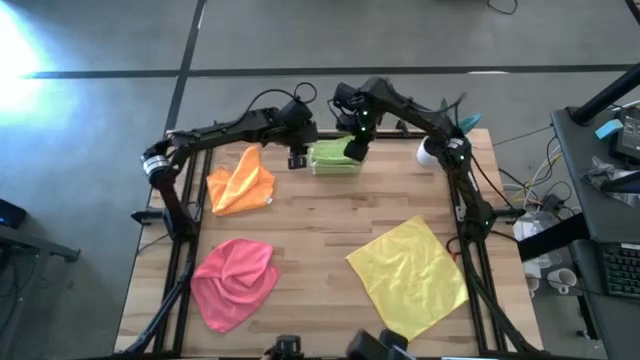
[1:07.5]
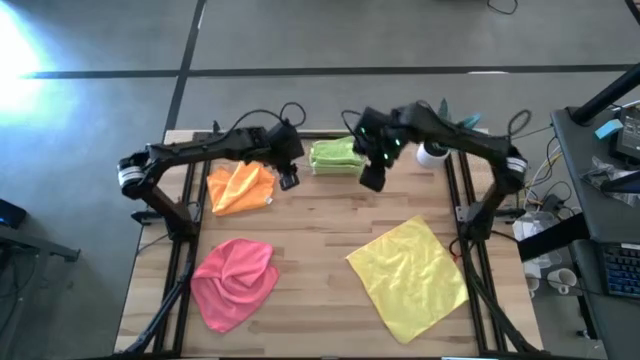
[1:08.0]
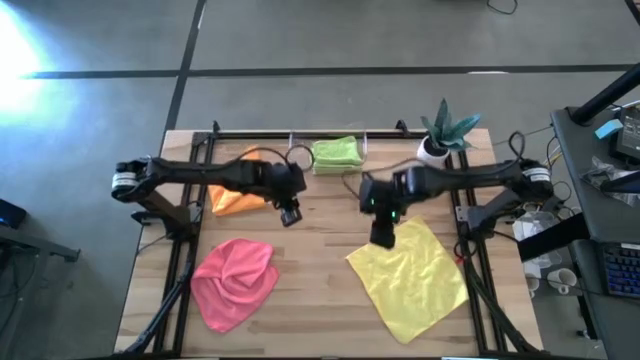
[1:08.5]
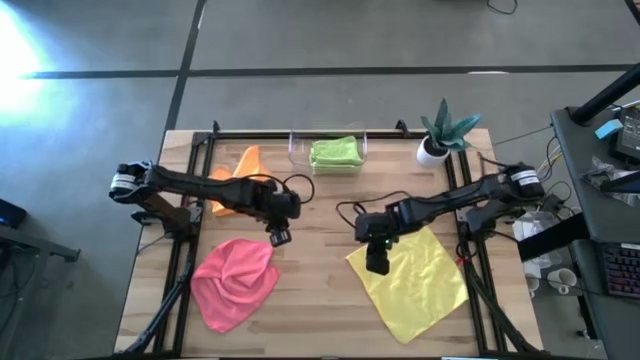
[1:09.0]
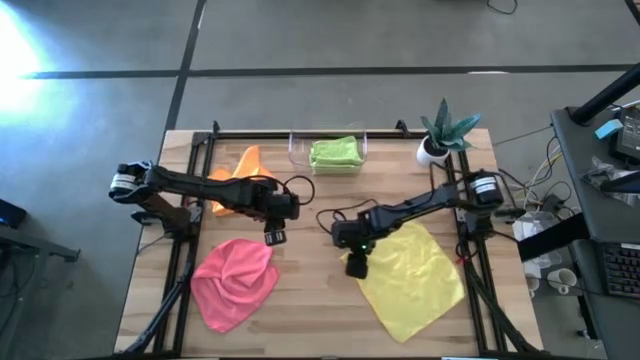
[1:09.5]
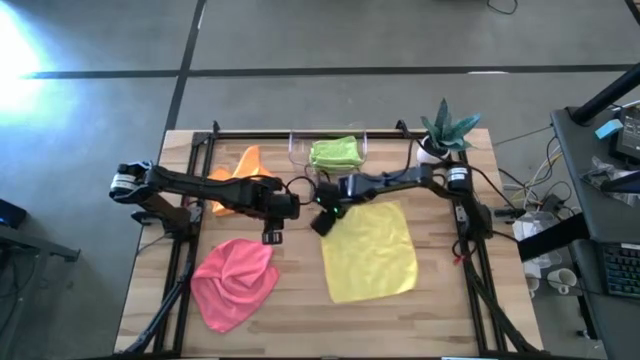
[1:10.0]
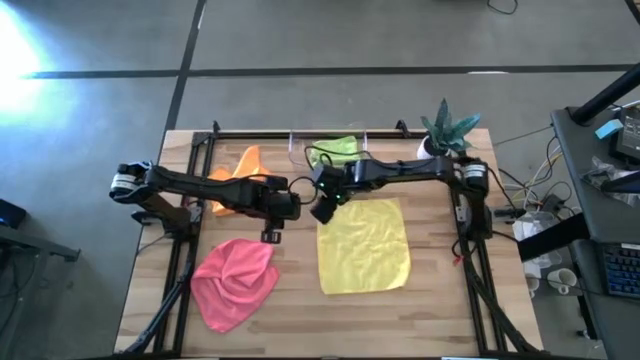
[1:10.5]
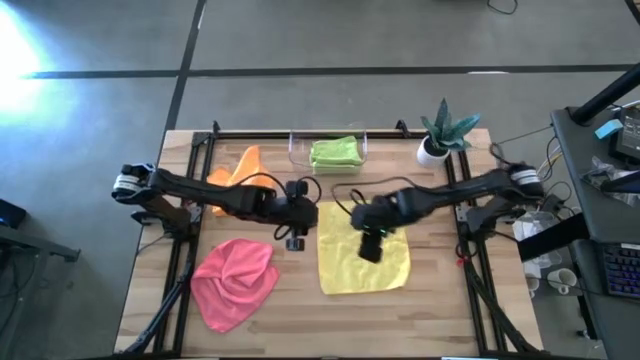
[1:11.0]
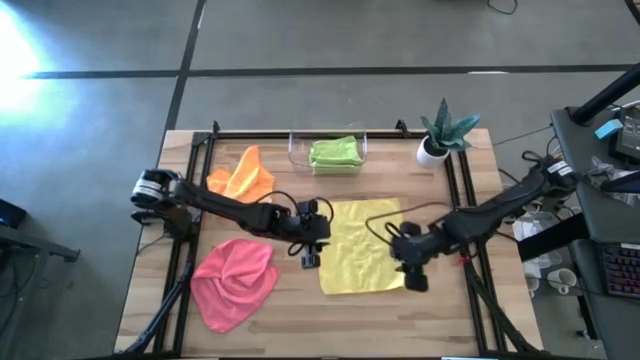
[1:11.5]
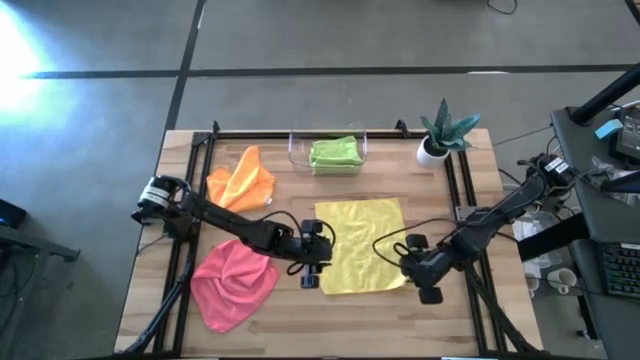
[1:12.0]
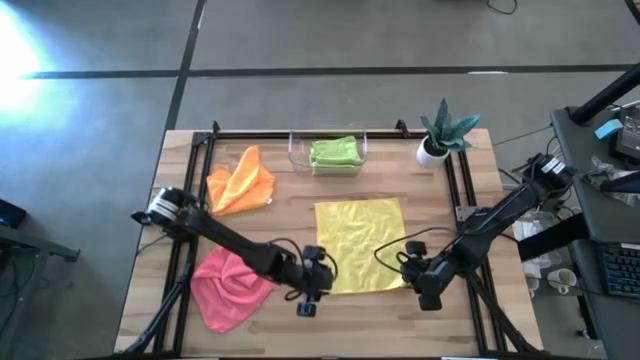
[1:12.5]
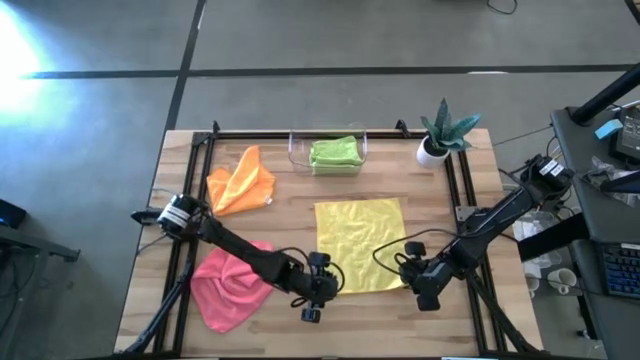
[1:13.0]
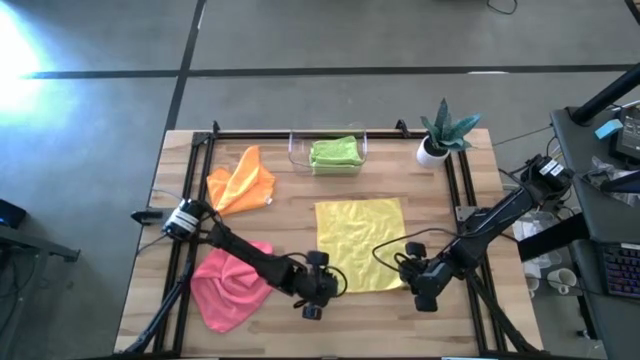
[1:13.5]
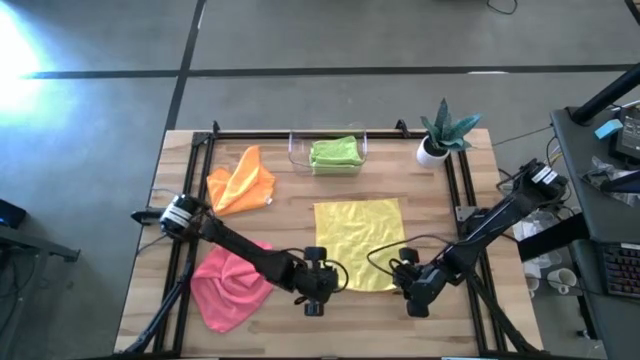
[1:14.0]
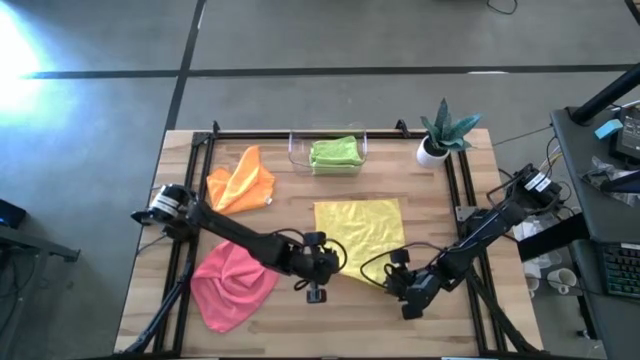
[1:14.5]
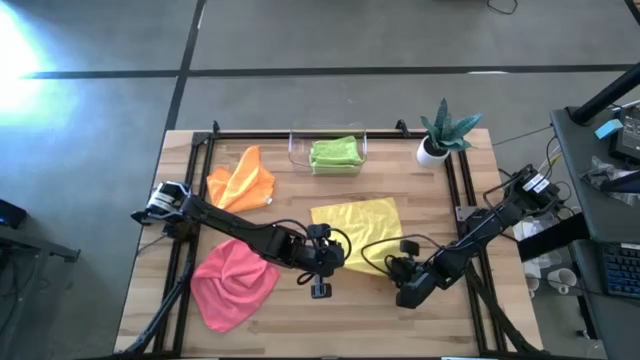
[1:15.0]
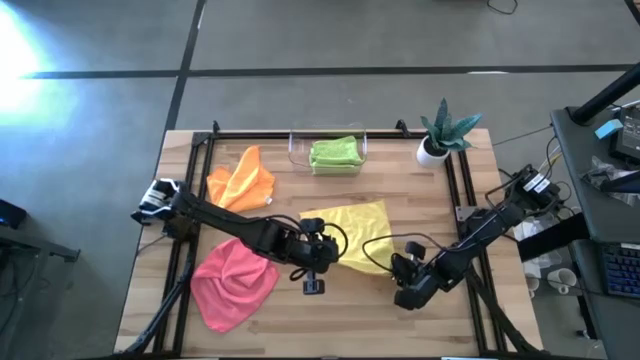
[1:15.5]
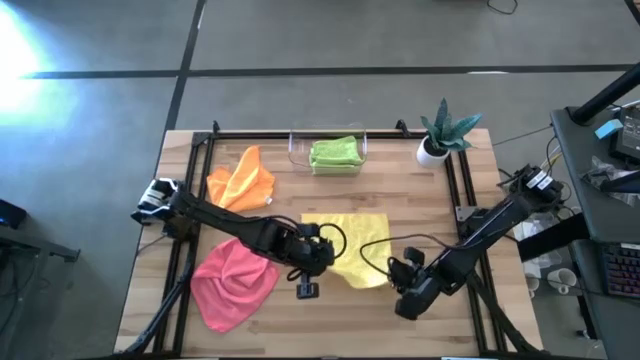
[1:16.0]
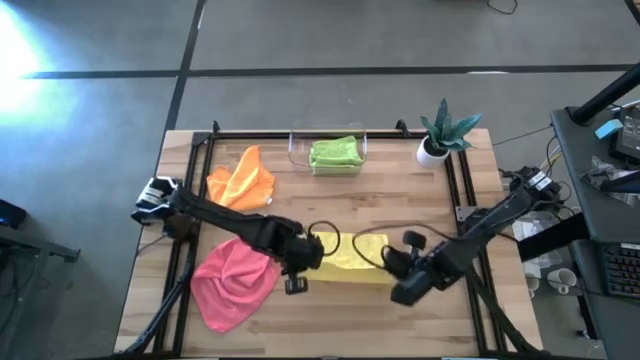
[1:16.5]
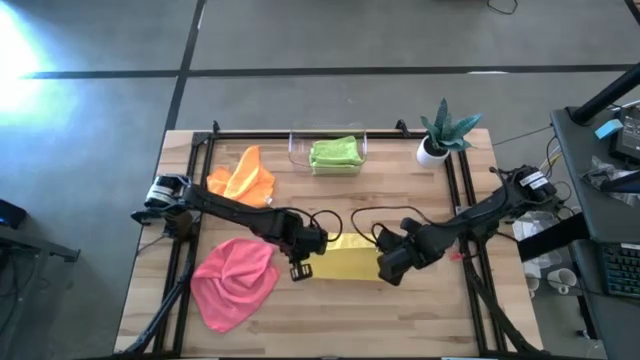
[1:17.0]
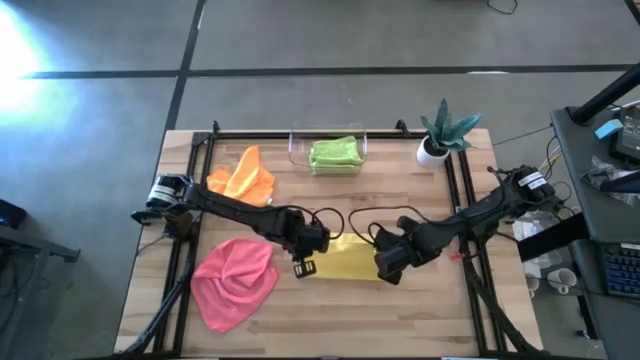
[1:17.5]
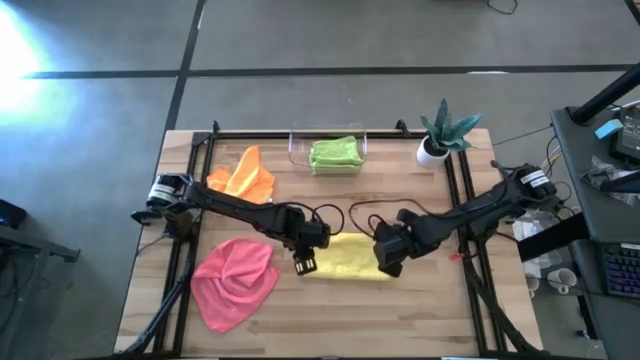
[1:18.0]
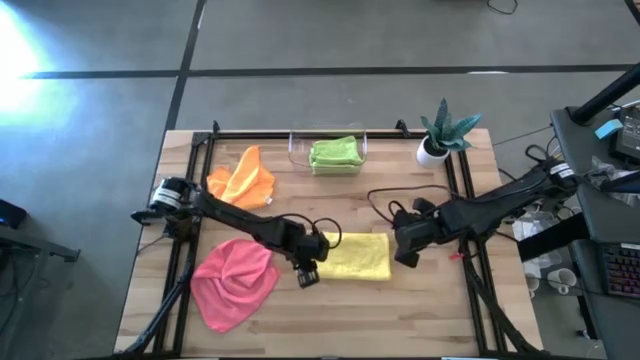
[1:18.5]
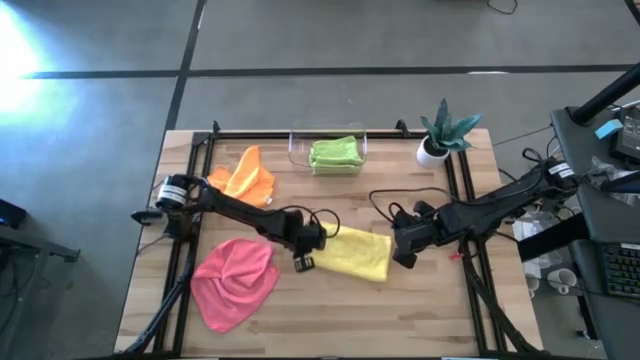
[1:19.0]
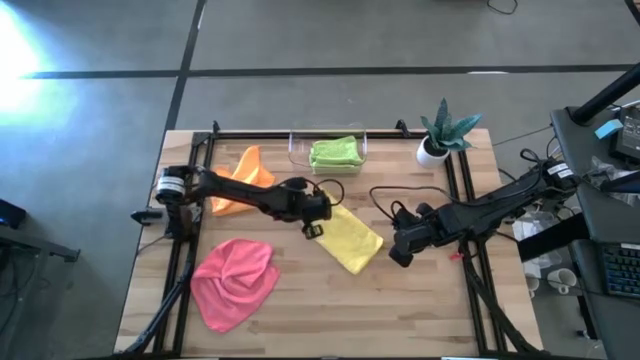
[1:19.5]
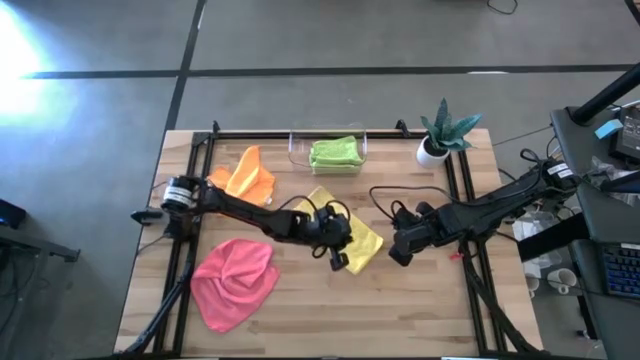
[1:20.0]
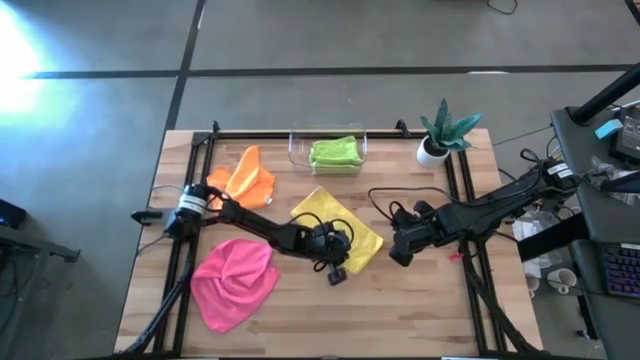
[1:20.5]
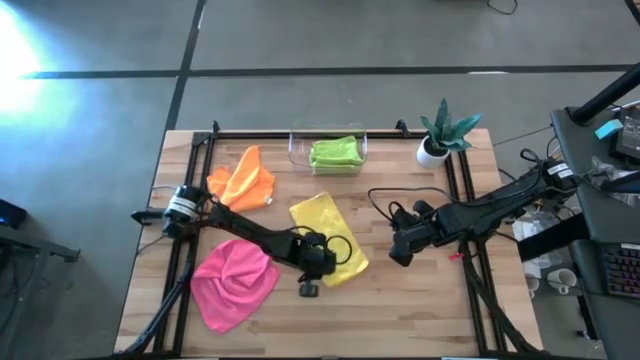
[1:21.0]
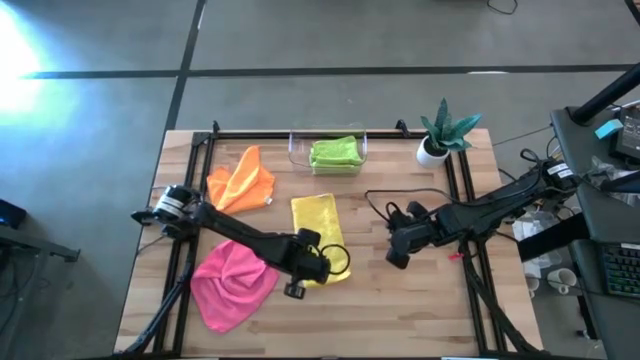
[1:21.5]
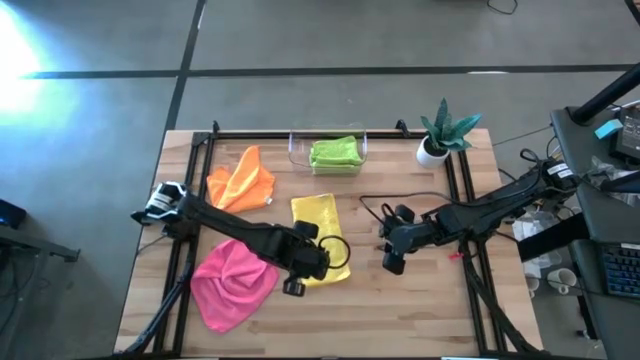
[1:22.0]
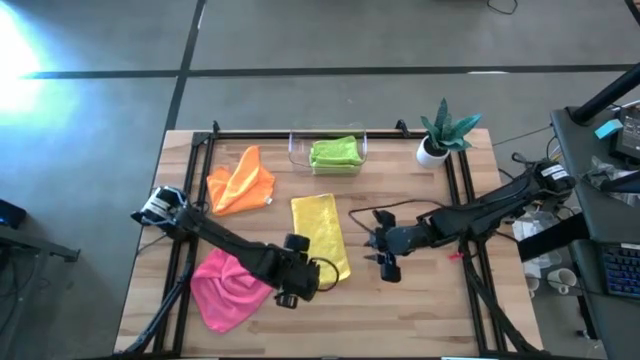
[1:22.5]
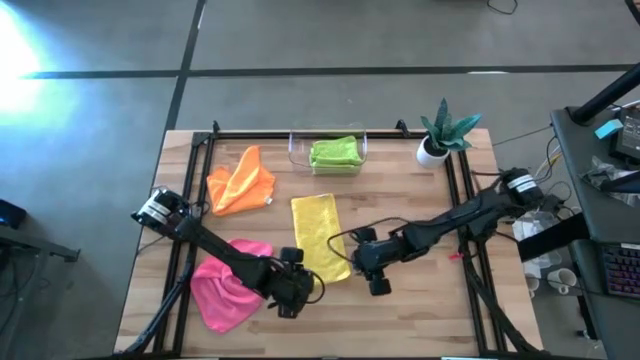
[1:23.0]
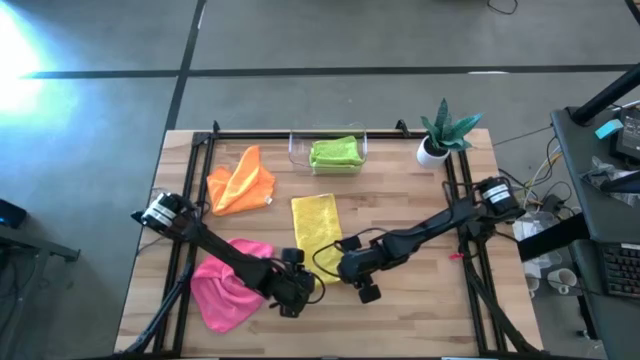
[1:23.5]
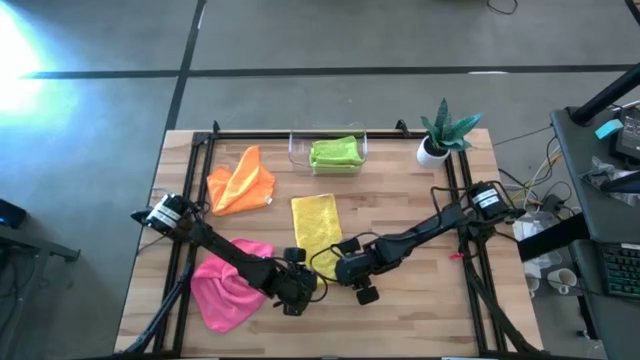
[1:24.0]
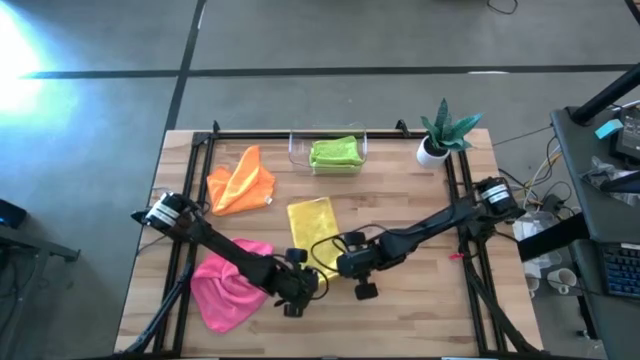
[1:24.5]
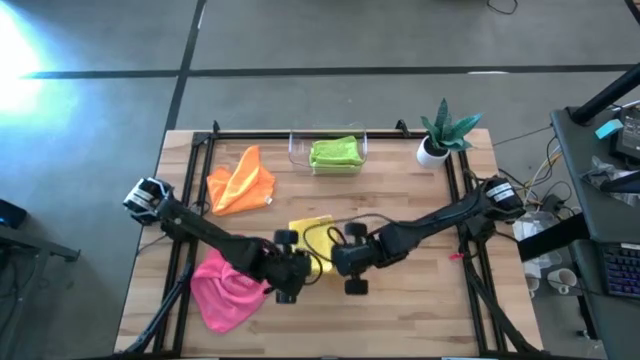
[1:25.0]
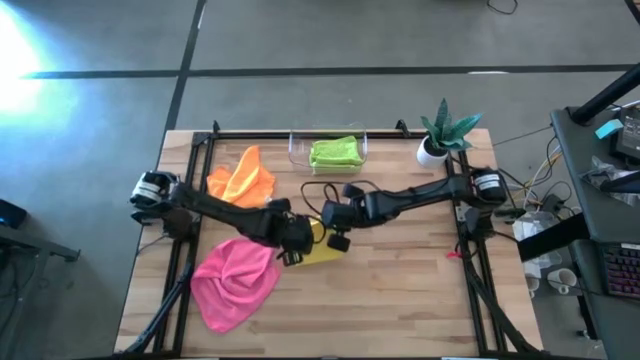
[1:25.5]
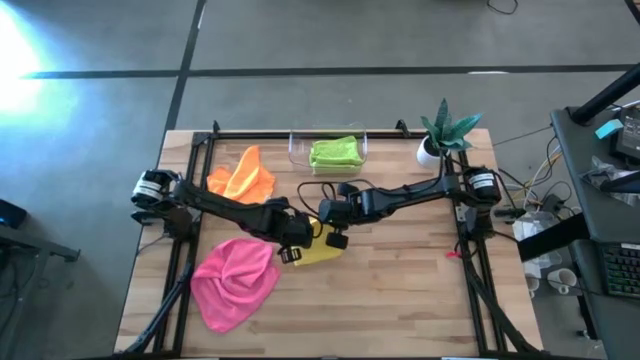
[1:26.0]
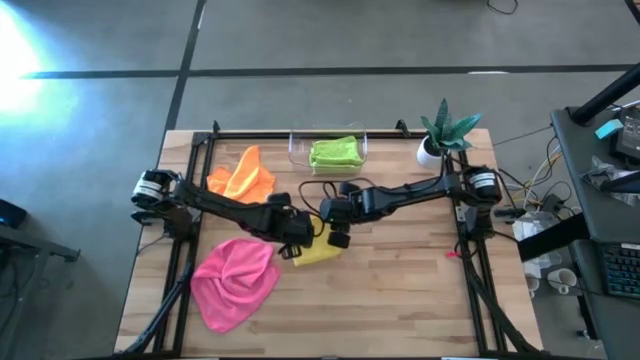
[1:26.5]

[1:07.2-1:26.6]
Task: Fold microfiber towels
Fold the yellow microfiber towel on the table

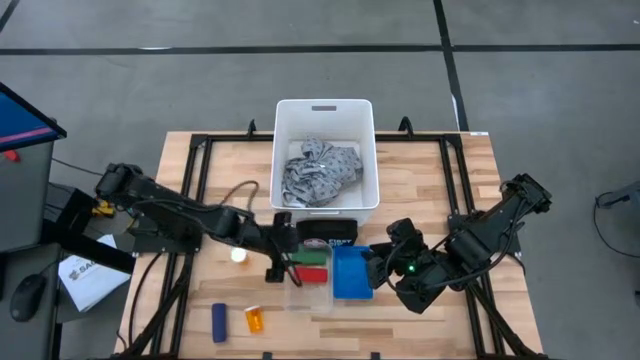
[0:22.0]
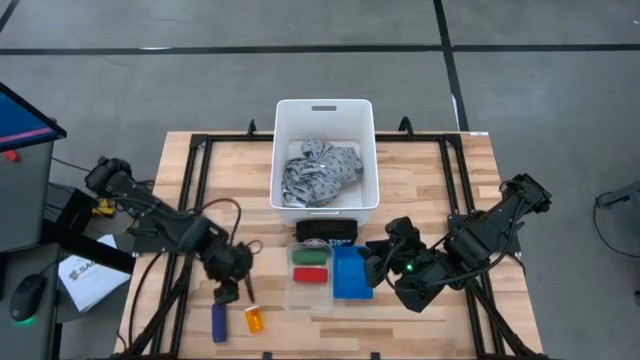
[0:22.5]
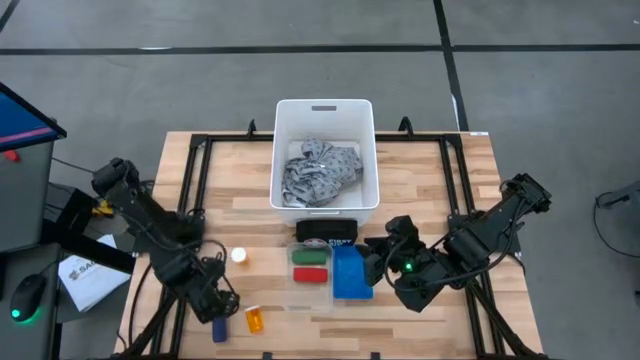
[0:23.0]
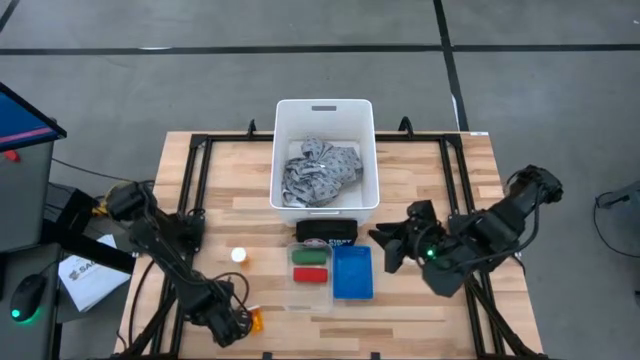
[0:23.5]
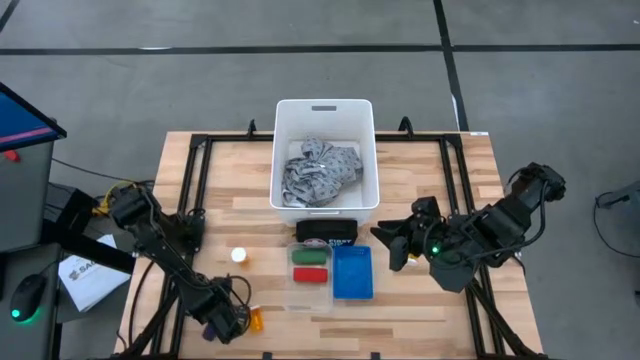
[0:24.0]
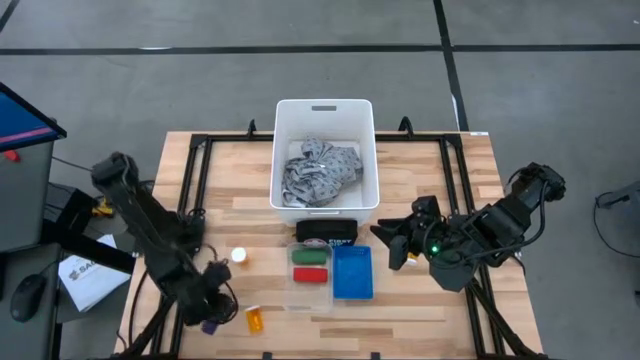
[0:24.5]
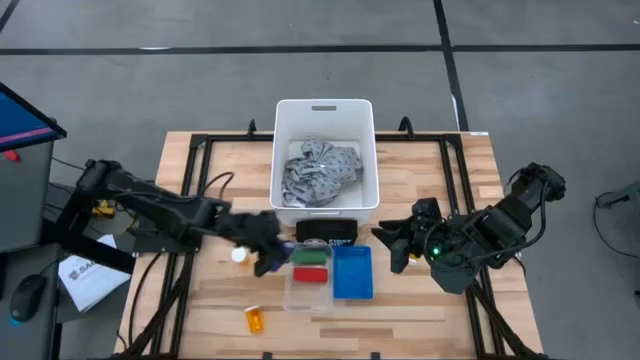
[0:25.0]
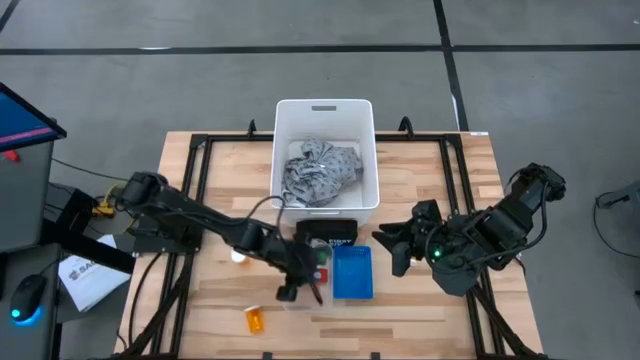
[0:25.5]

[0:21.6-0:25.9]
Task: Pick & place medical supplies in basket/bin
Put the blue bandage into the transparent bin
